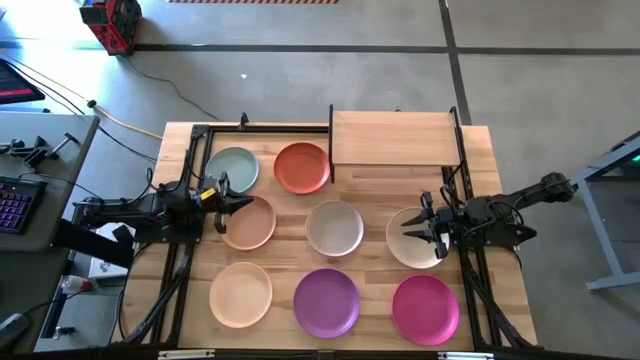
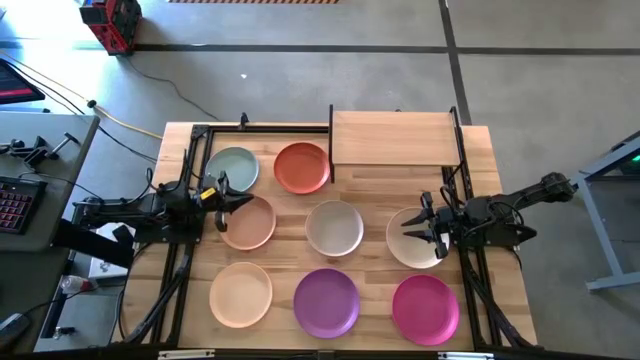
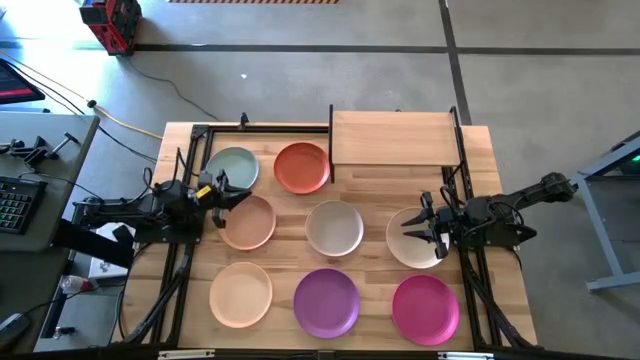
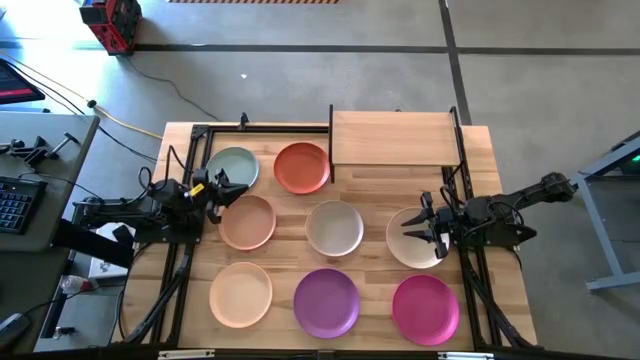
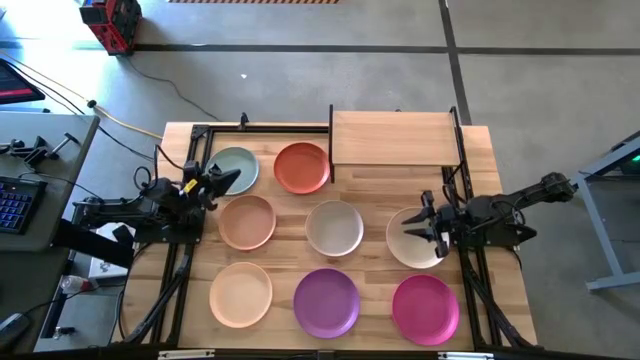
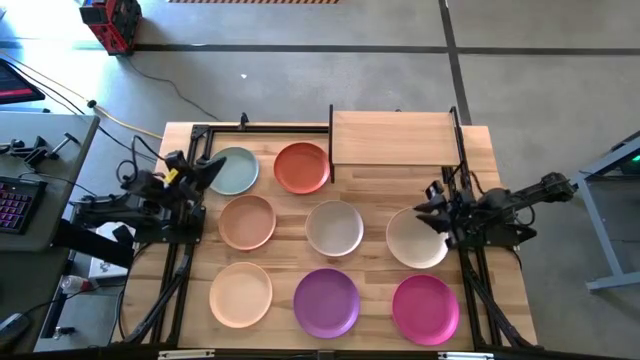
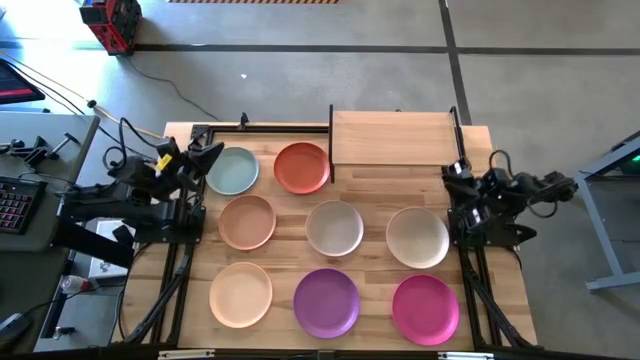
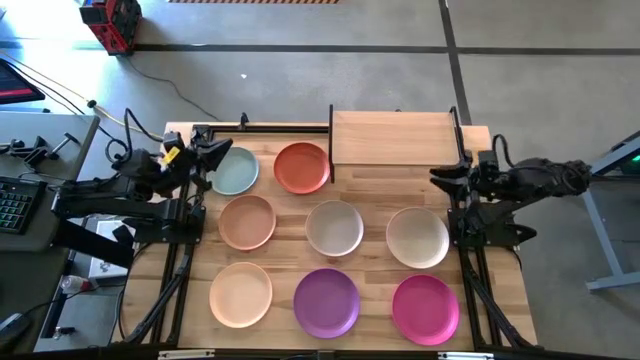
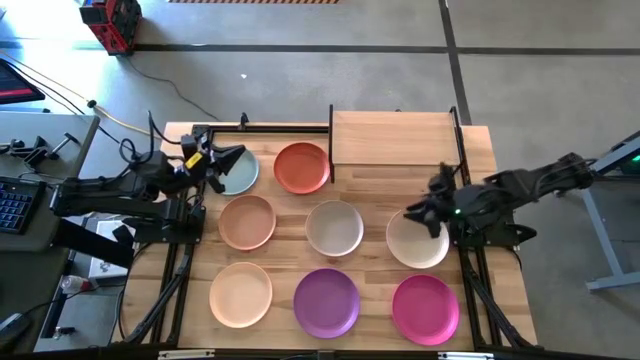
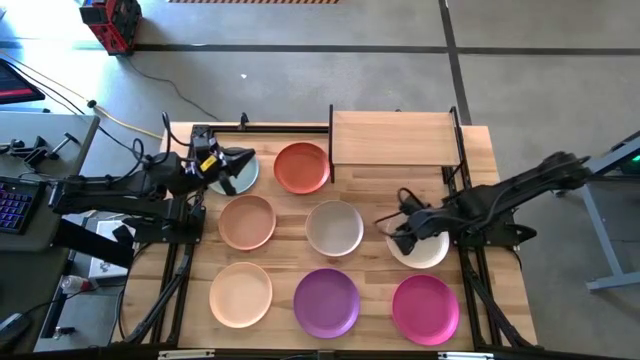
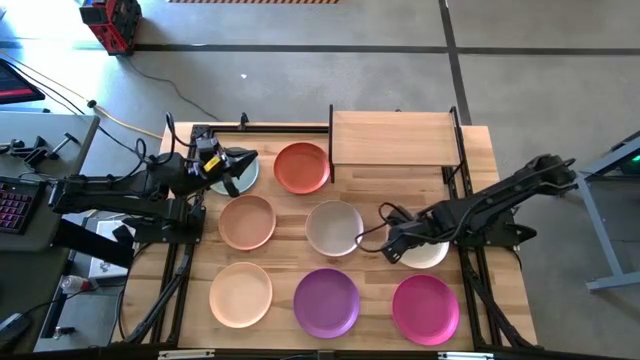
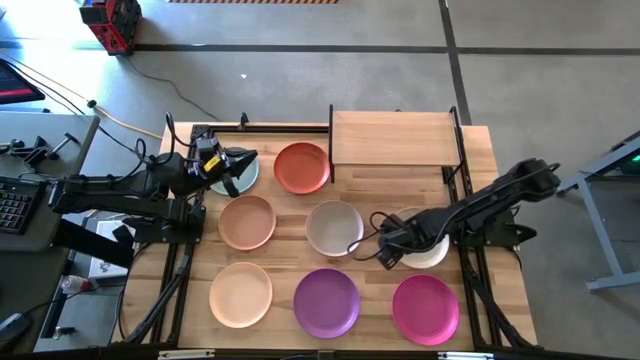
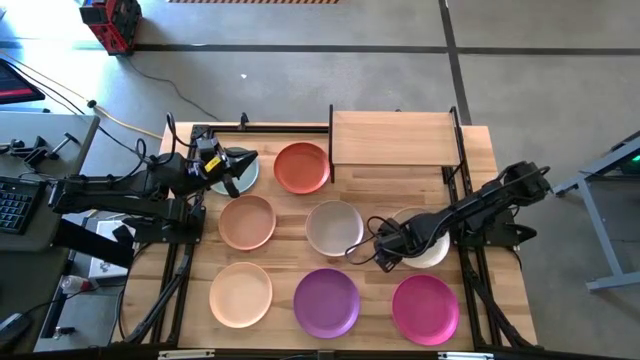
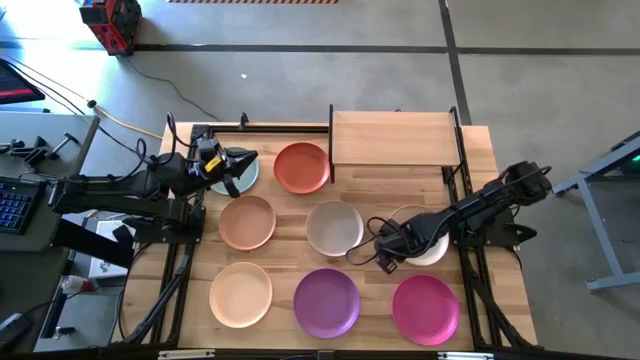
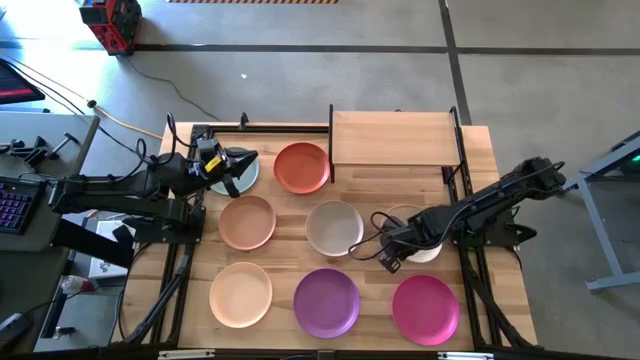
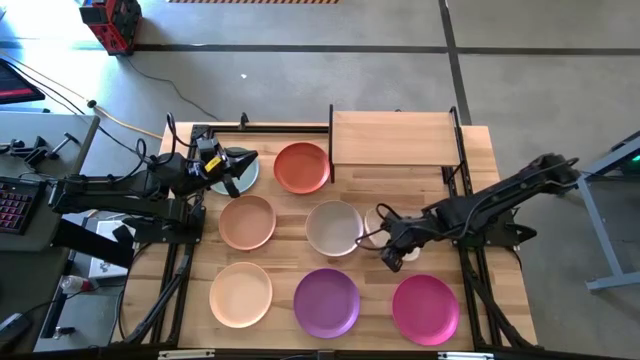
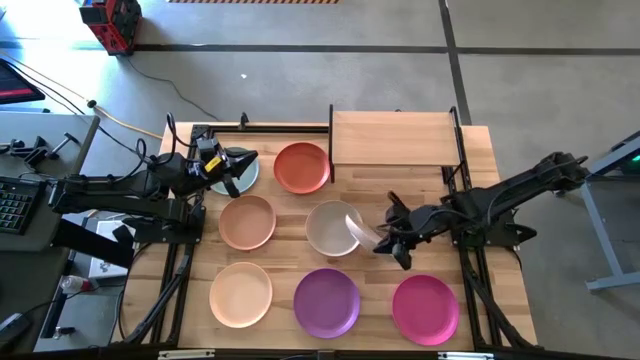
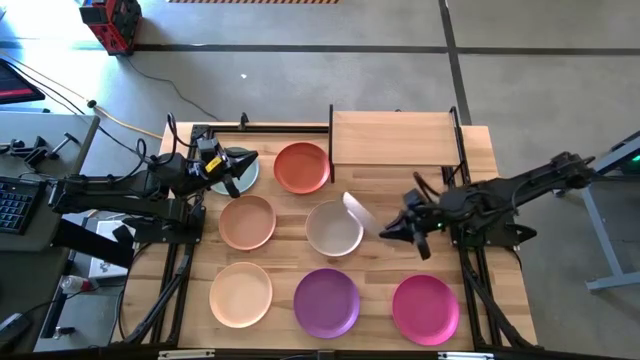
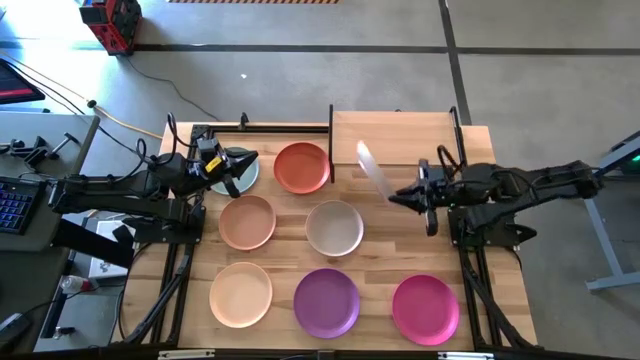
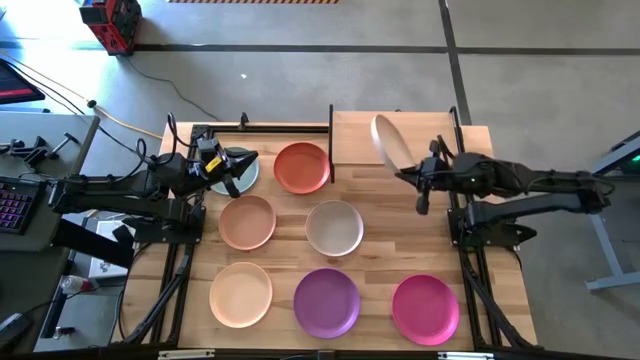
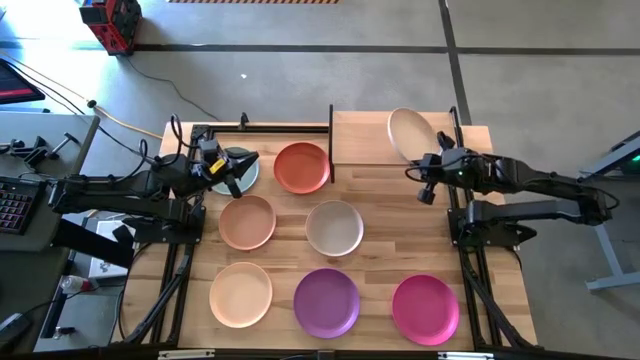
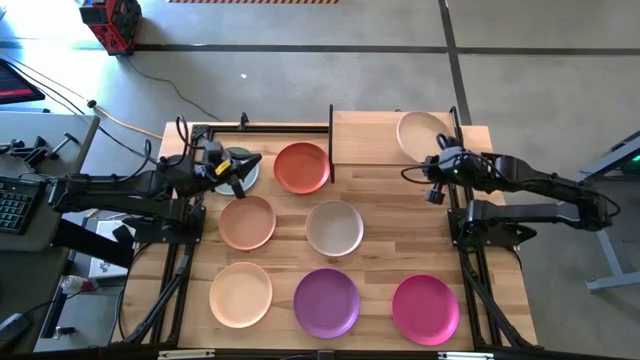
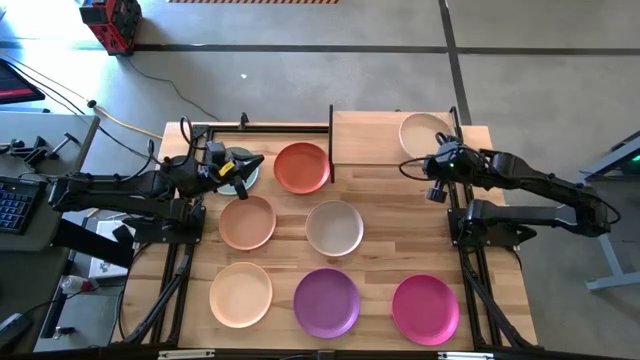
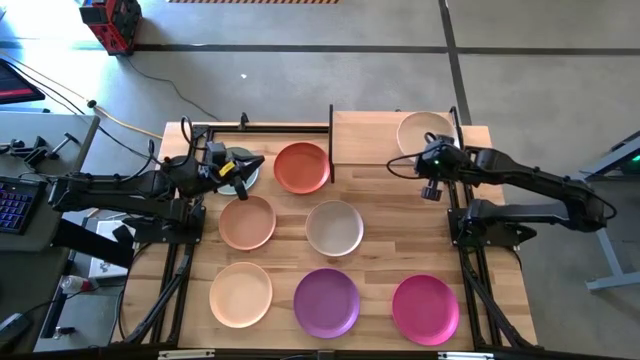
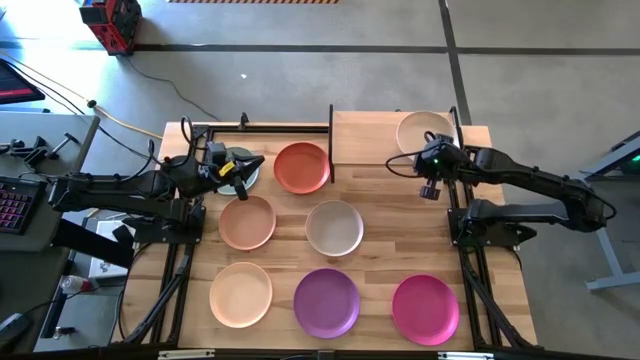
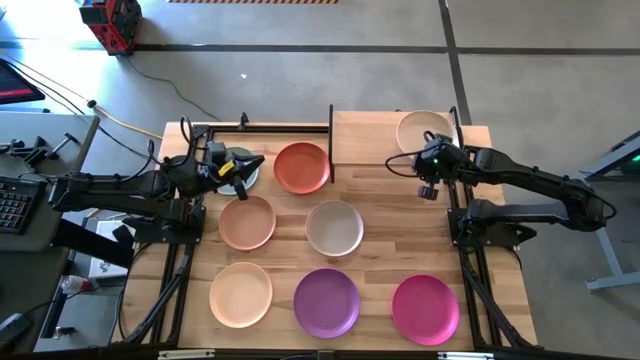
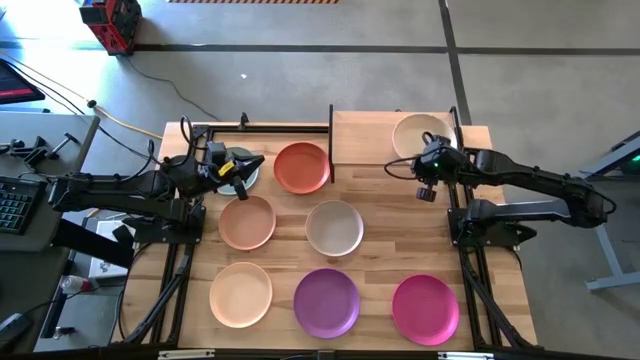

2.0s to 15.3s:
Task: Place and stack plates onto a shelf
Put the white plate on the shelf

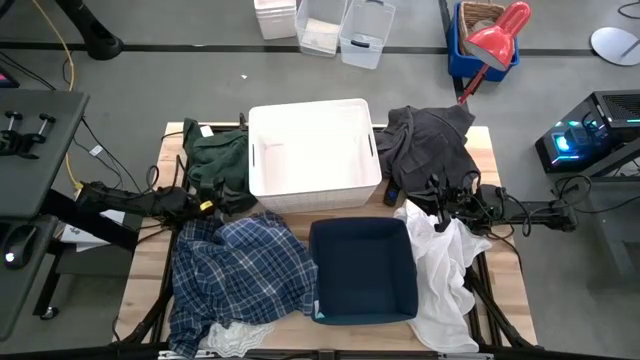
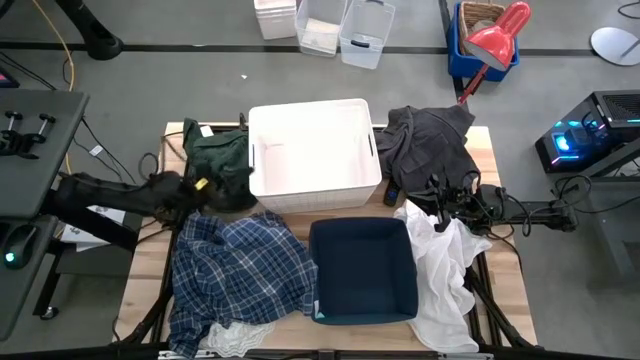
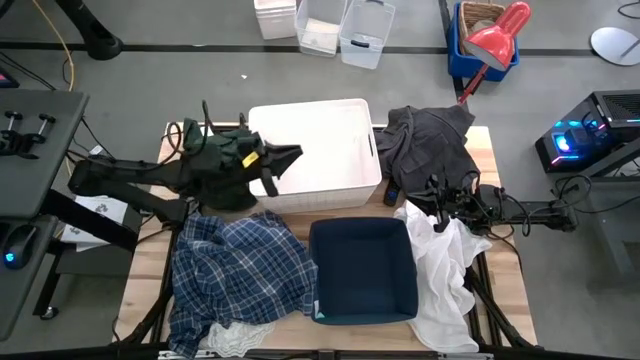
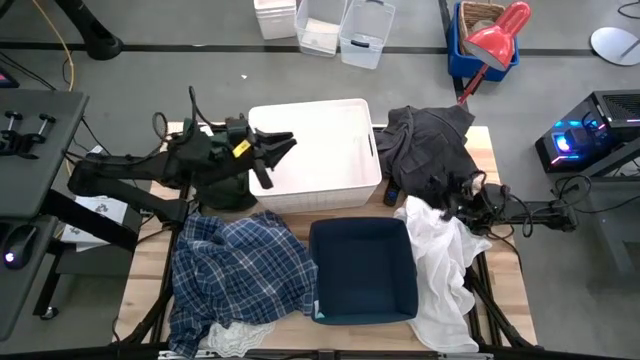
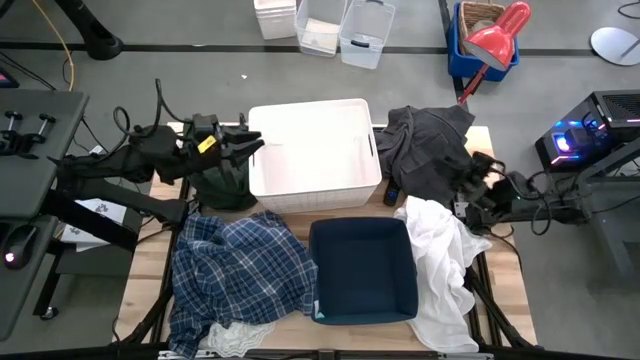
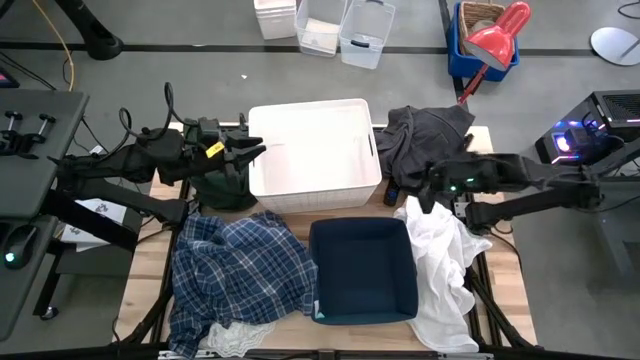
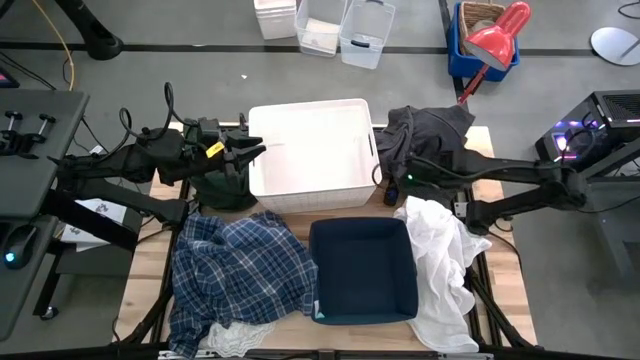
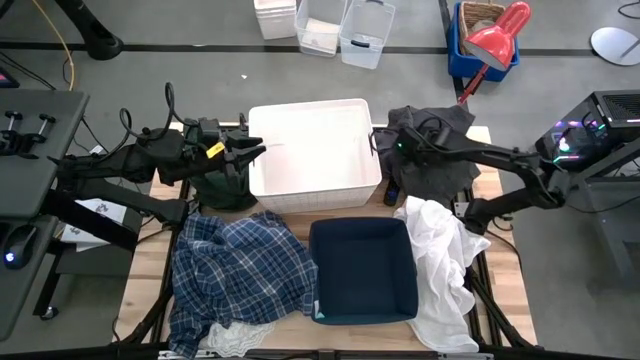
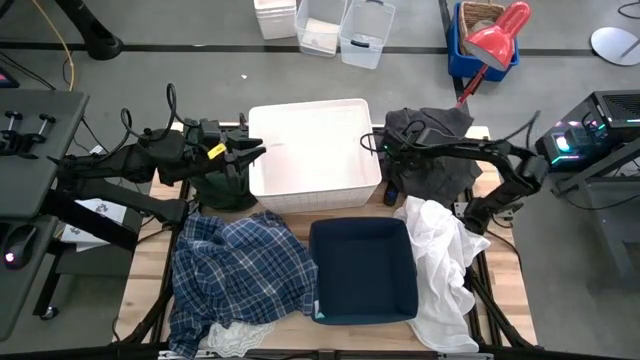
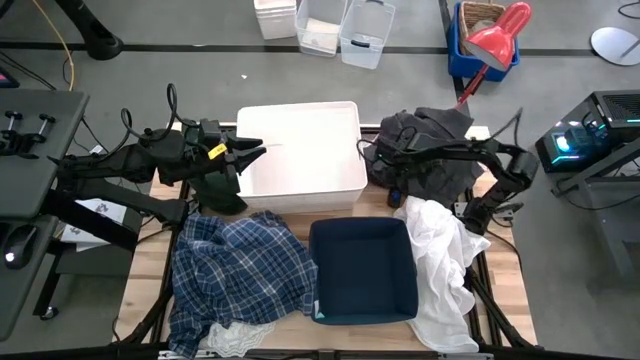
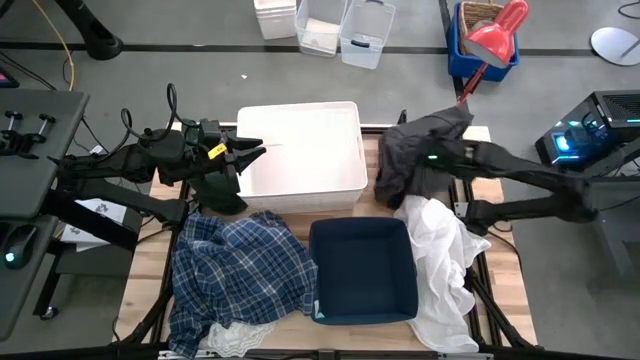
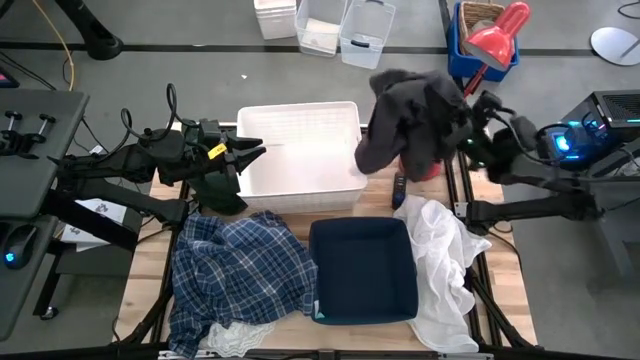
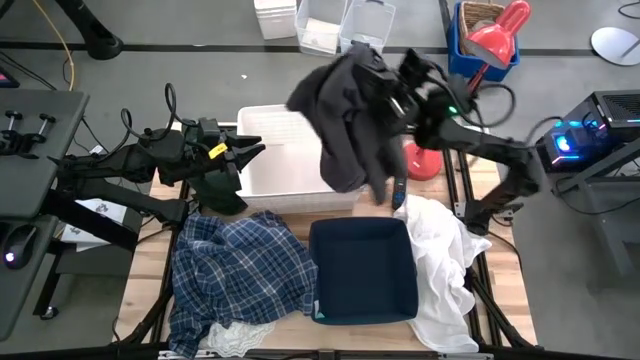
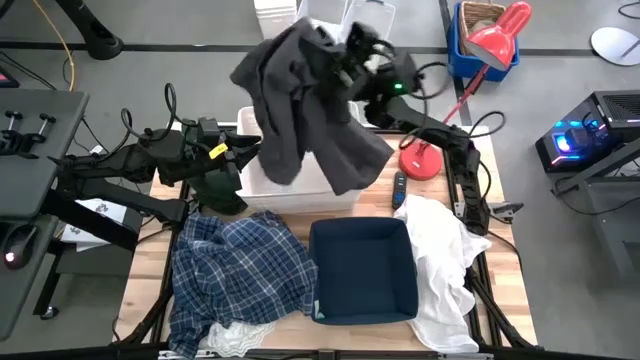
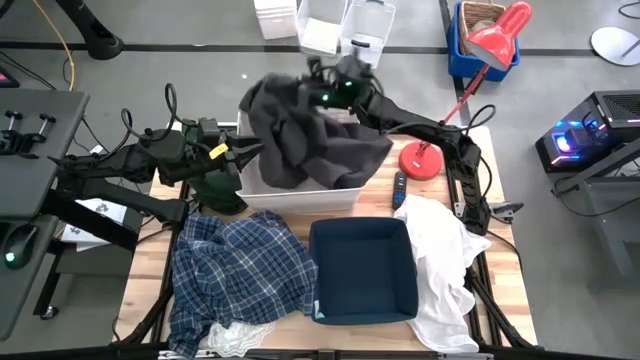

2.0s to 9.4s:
Task: Sort clothes
Put the gray shorts into the white laundry bin
